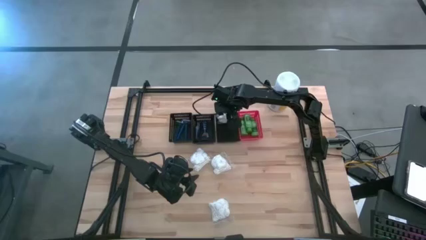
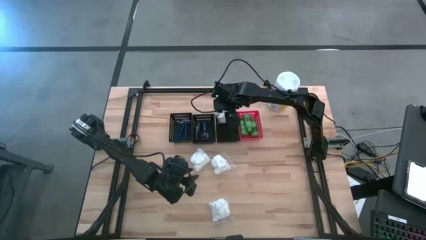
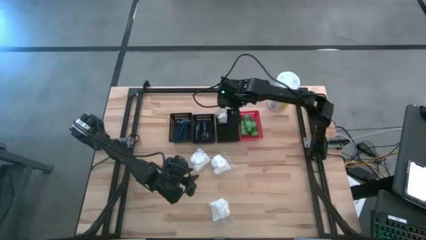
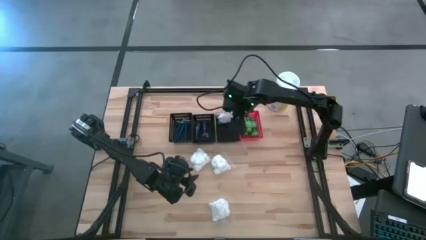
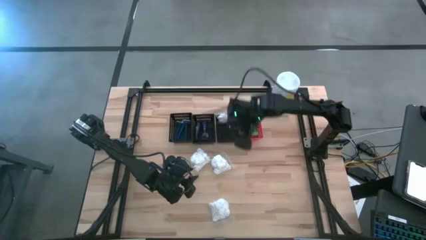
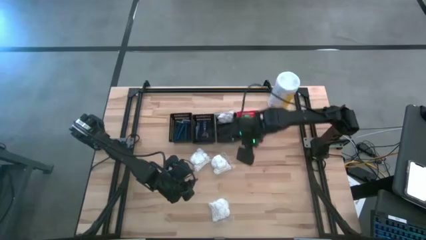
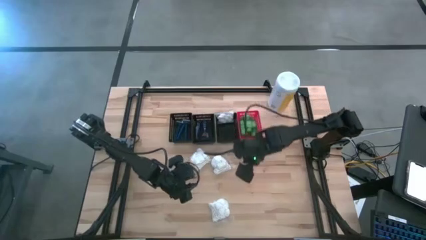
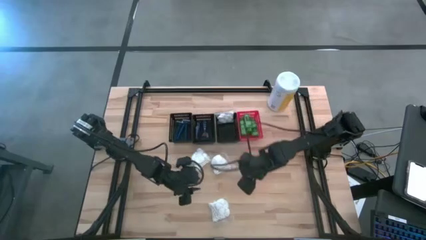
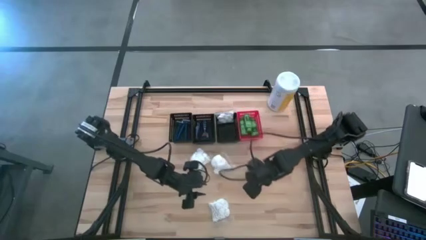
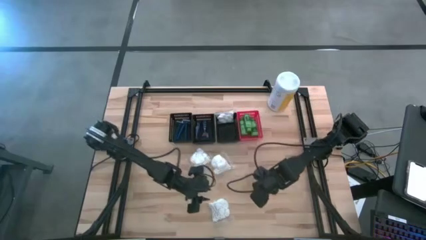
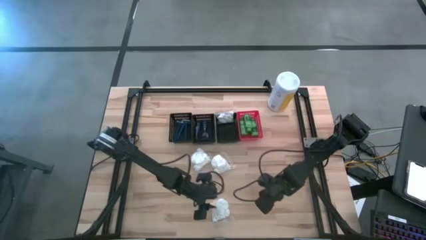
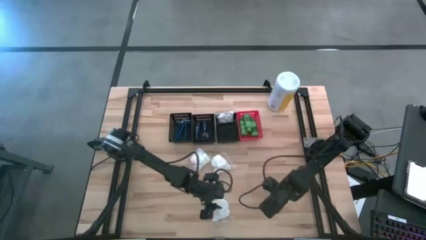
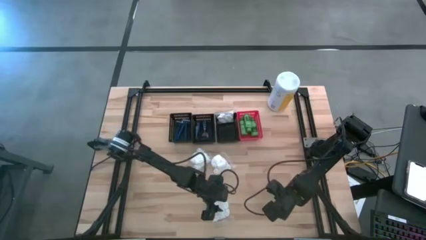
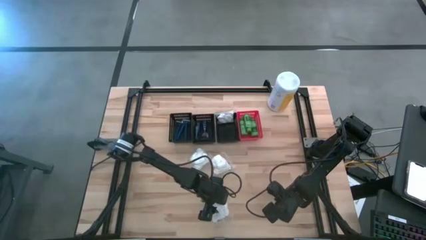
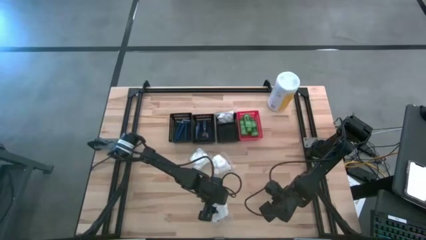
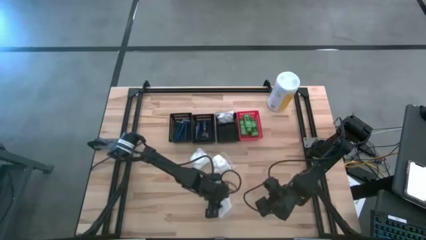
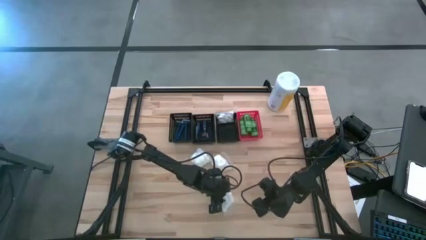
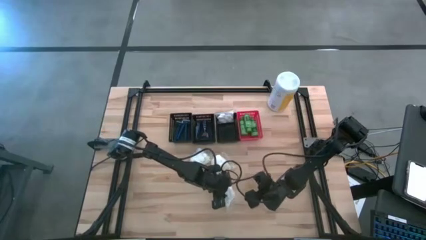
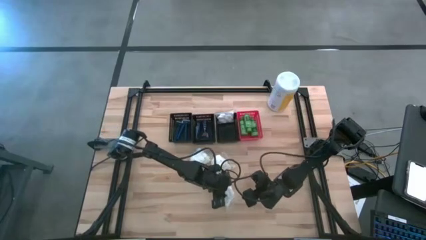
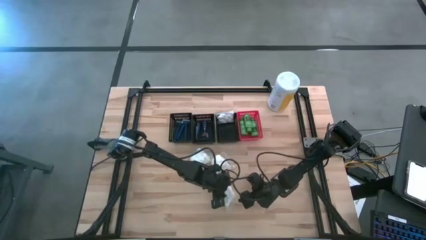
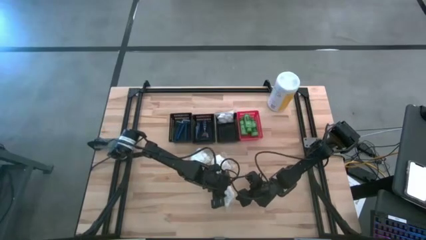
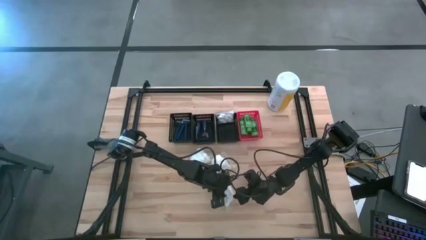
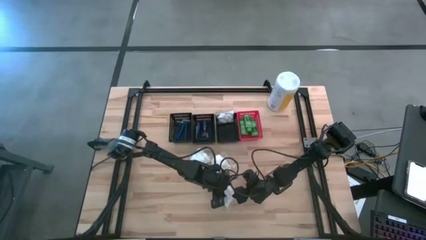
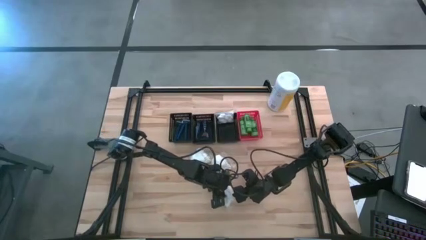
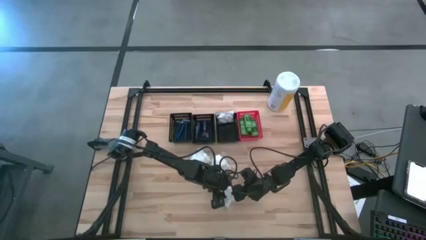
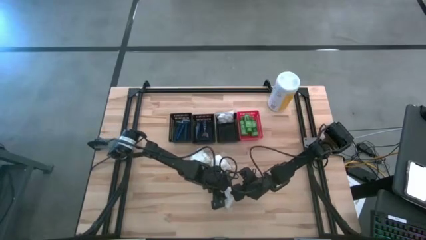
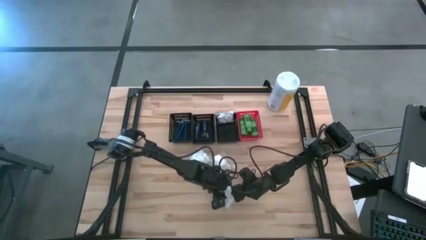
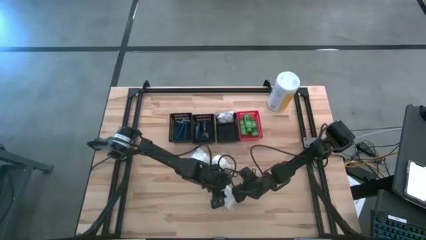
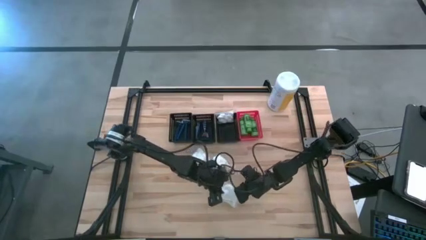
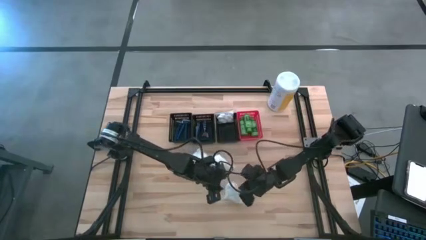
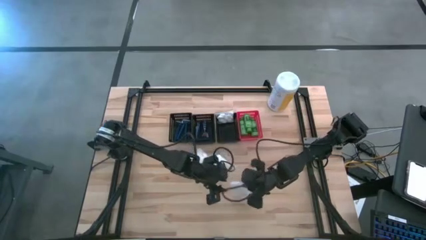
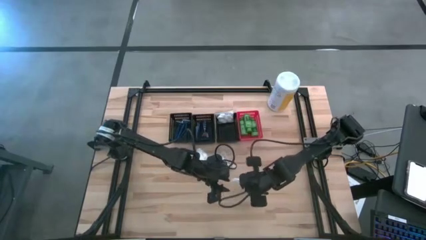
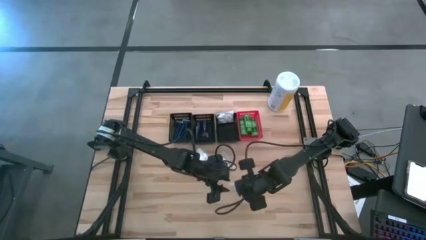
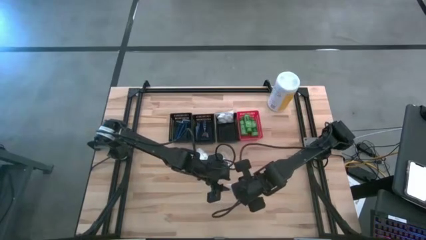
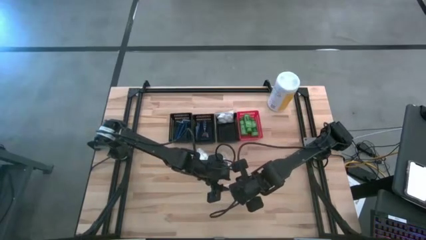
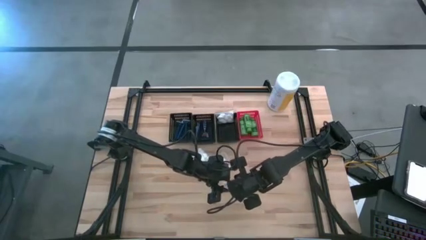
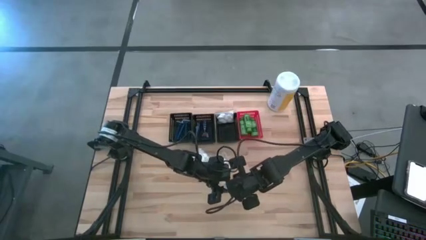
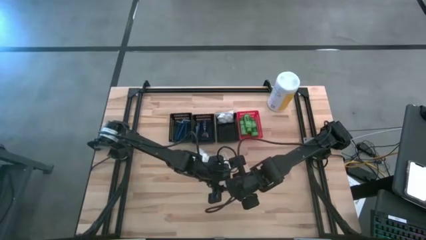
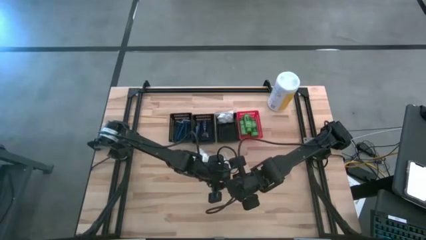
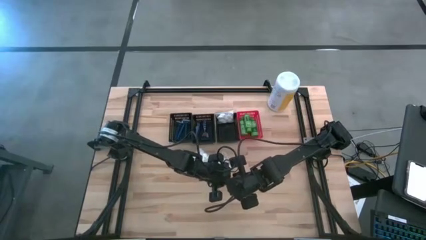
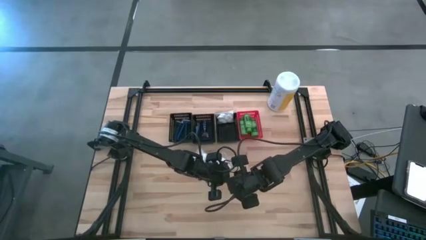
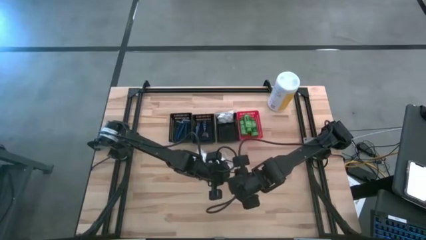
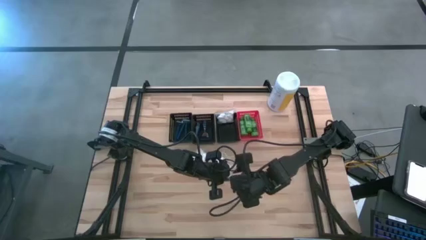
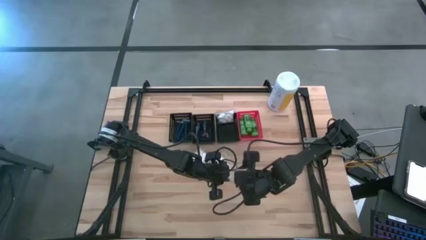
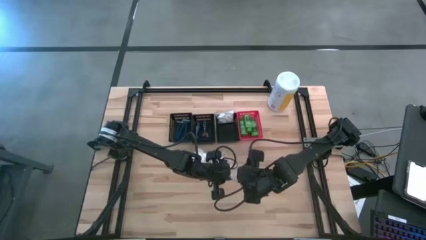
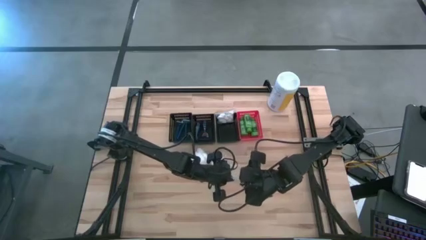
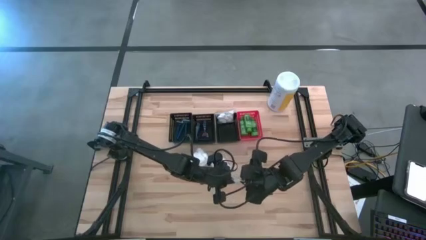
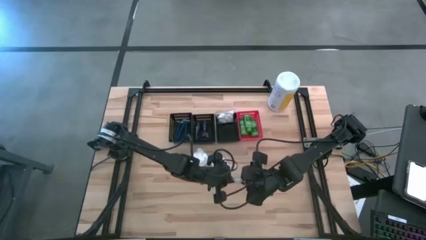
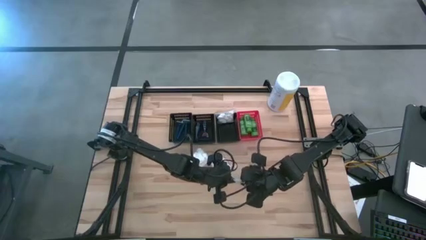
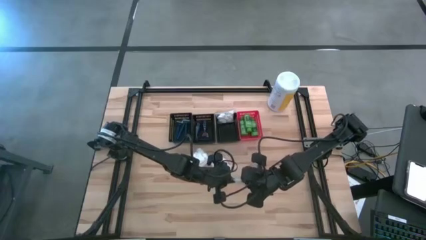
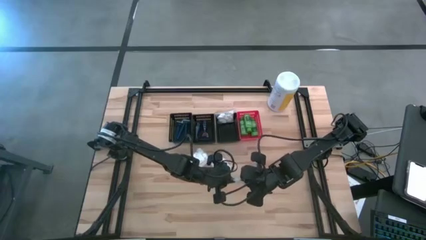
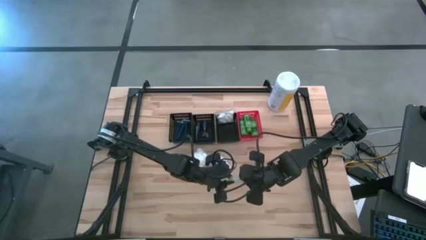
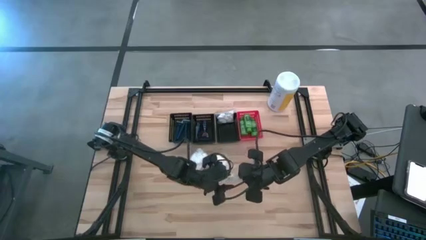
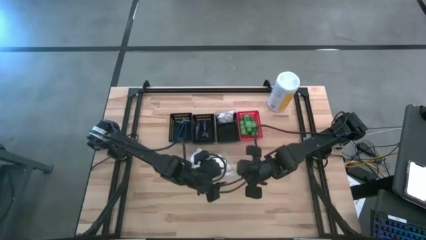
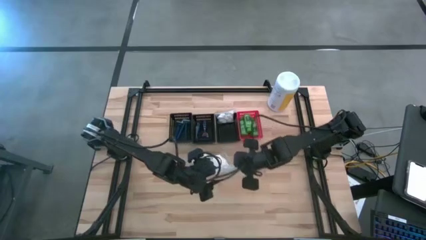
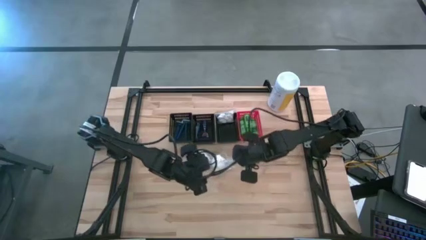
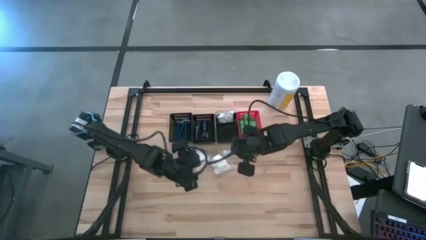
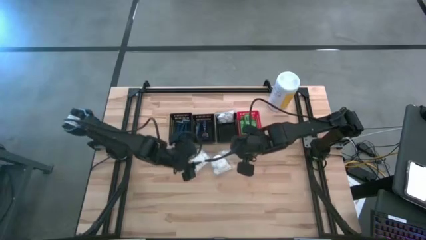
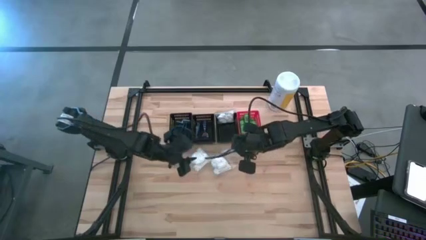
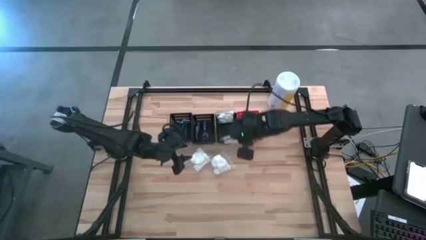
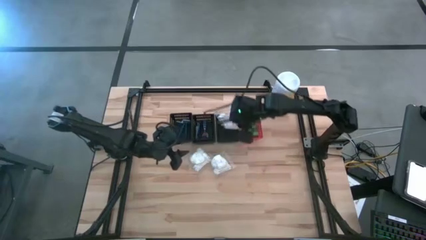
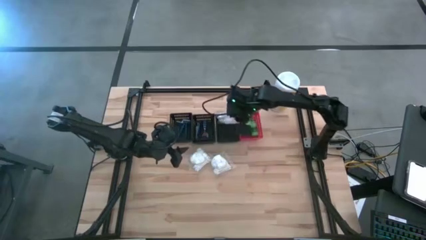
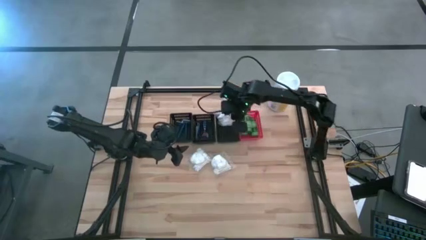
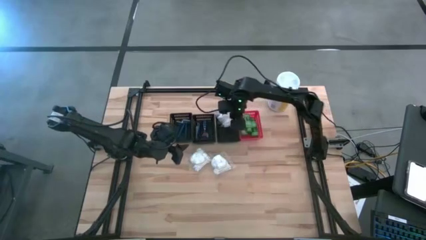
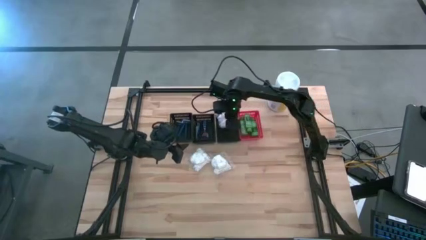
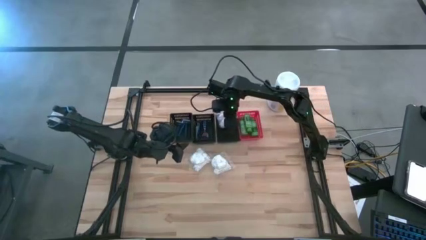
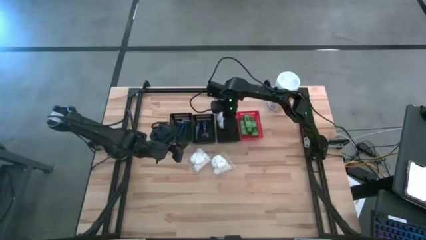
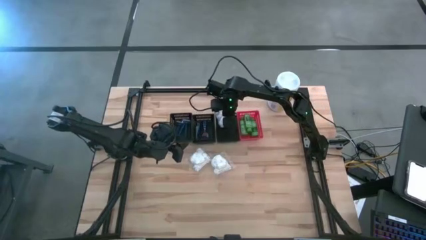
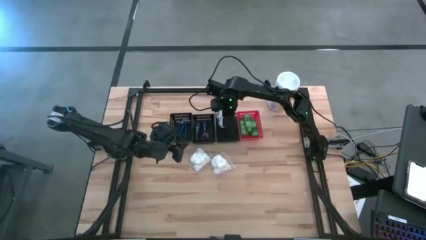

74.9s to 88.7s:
Task: Pick & Place Travel size toiletries
Put the white cotton pack into the right black bin

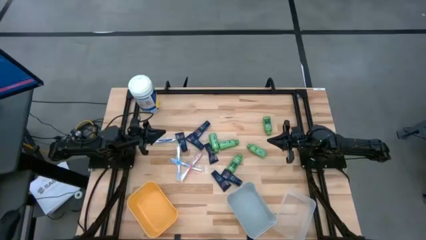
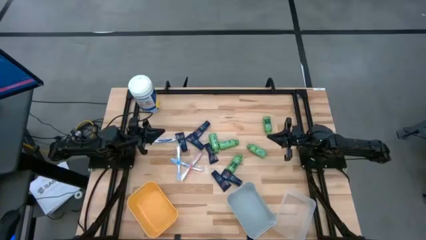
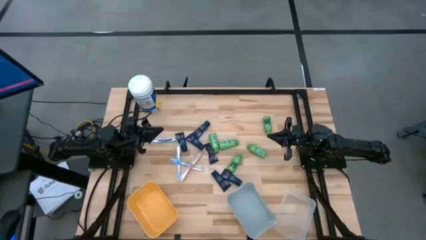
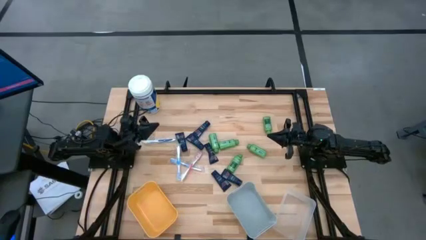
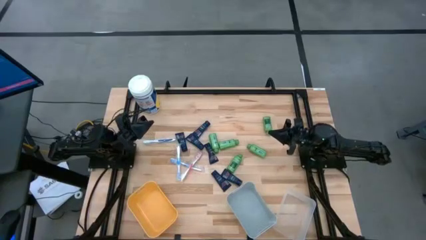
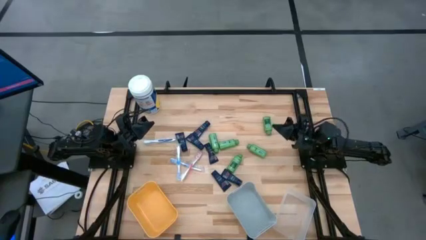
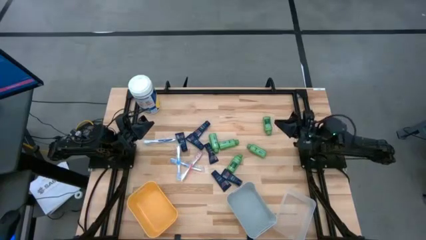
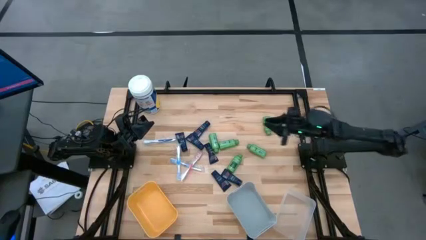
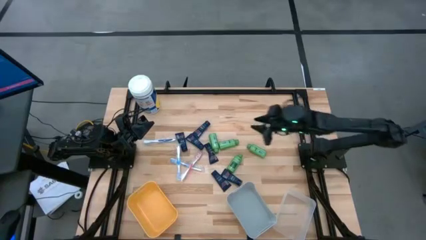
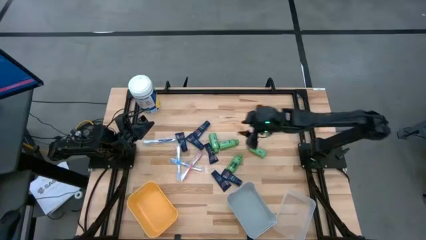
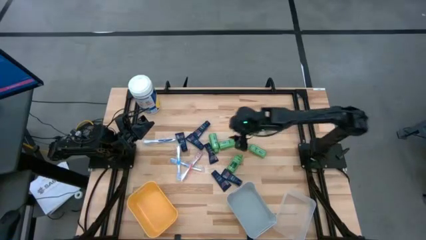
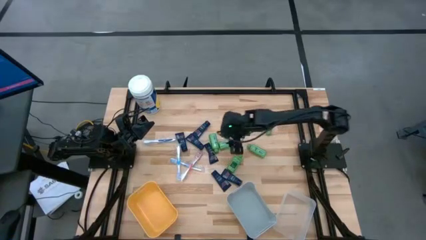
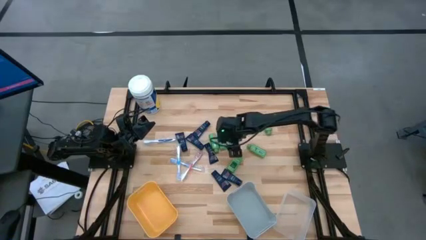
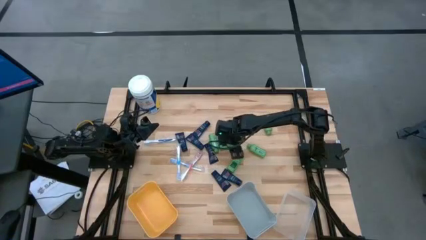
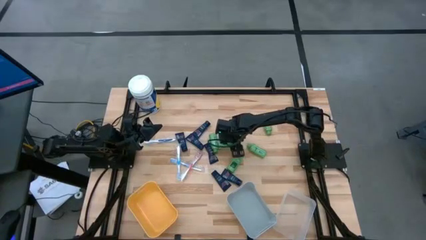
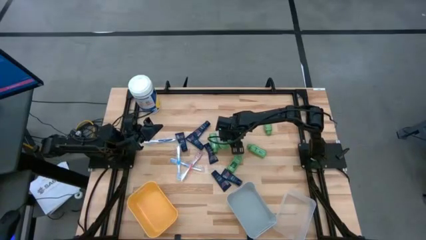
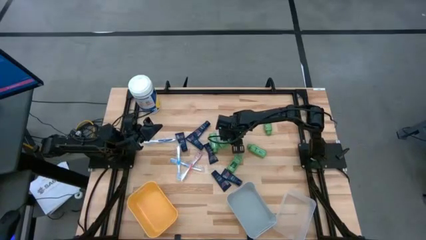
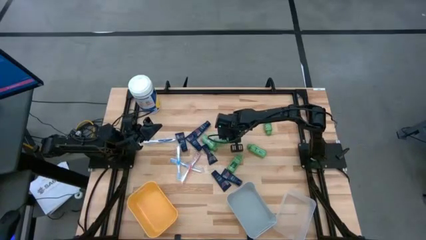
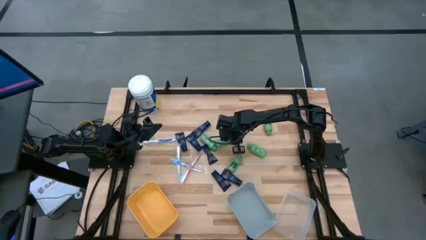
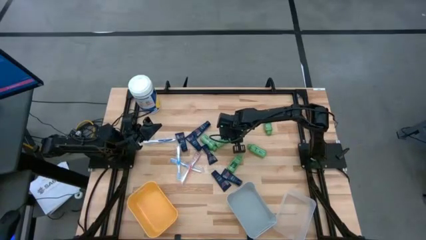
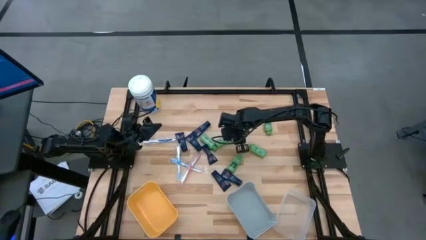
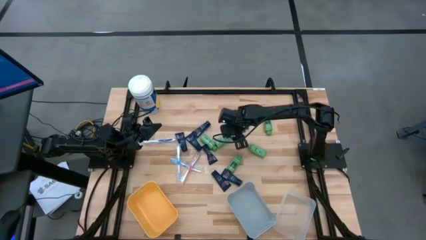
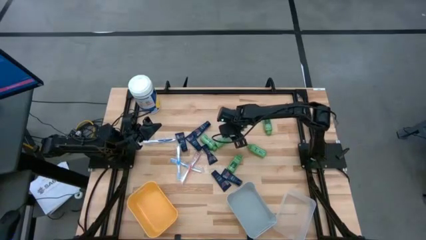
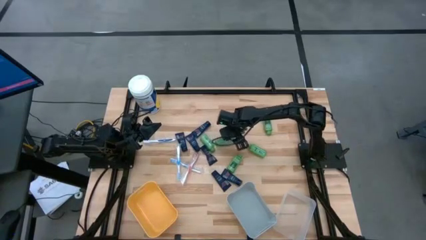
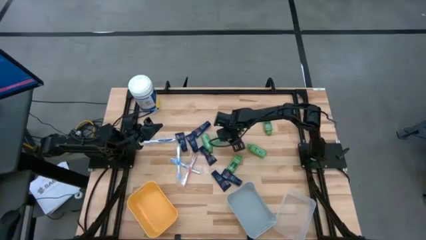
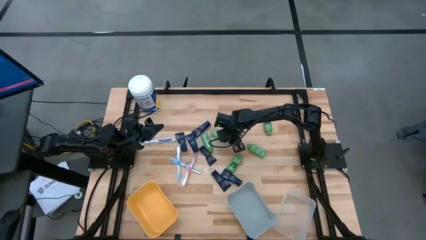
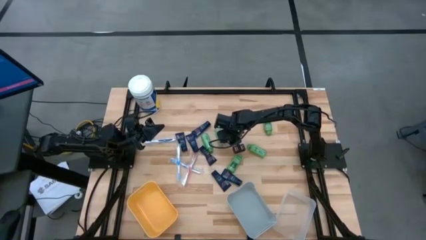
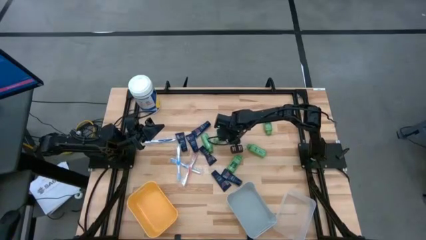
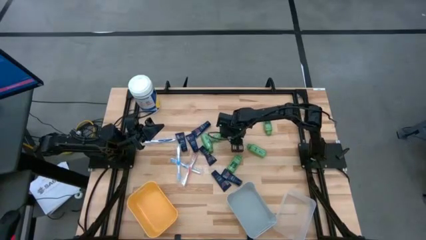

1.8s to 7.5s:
Task: Pick & Place Travel size toiletries
Put the green shampoo into the yellow bin
